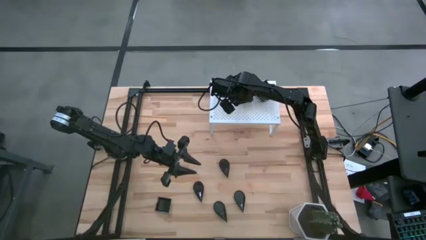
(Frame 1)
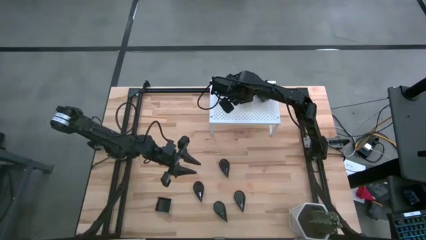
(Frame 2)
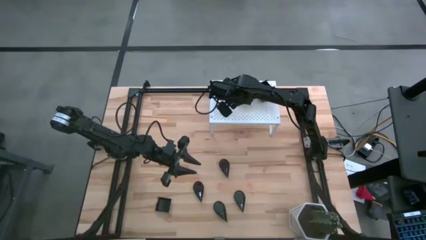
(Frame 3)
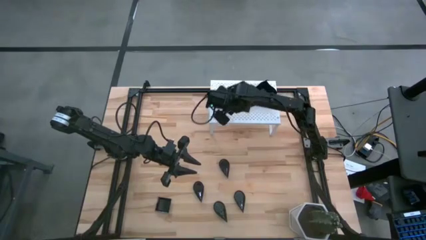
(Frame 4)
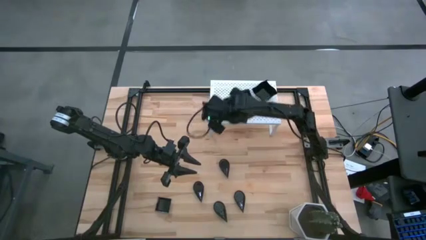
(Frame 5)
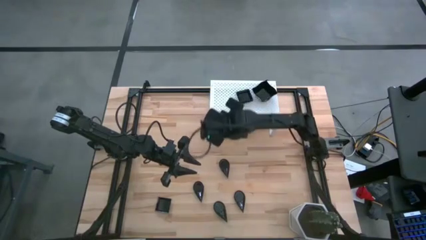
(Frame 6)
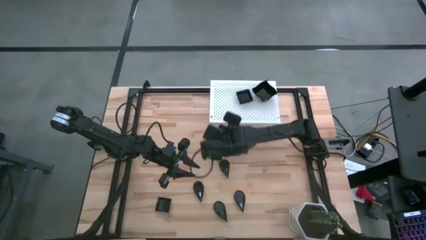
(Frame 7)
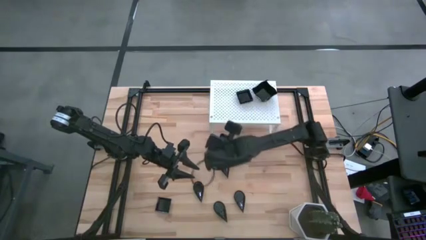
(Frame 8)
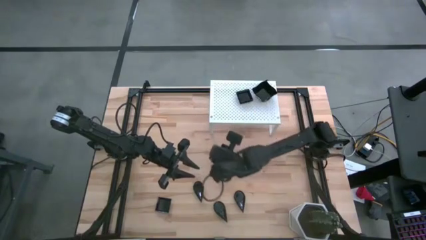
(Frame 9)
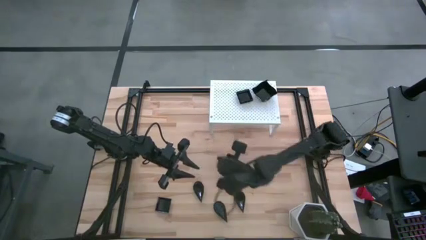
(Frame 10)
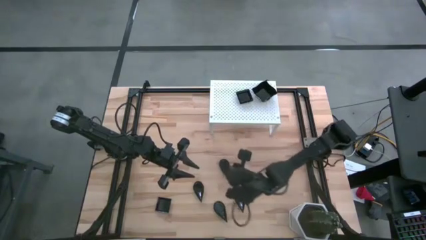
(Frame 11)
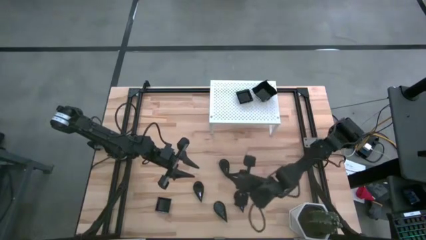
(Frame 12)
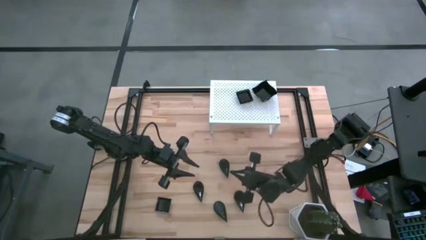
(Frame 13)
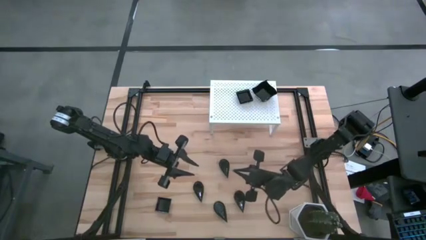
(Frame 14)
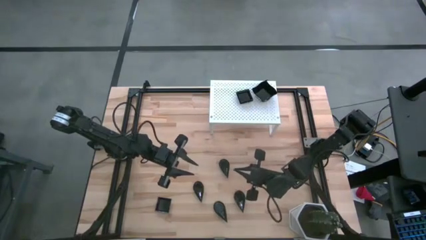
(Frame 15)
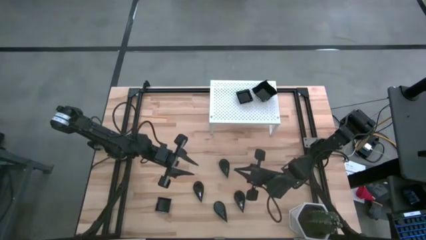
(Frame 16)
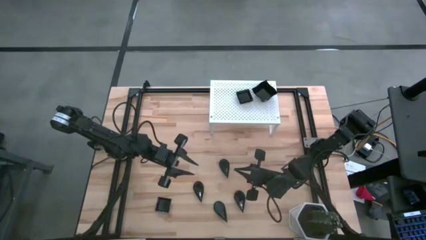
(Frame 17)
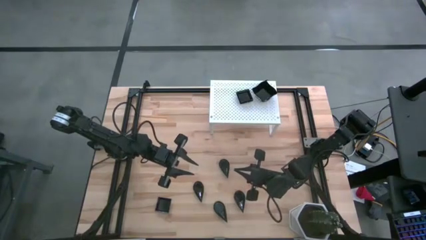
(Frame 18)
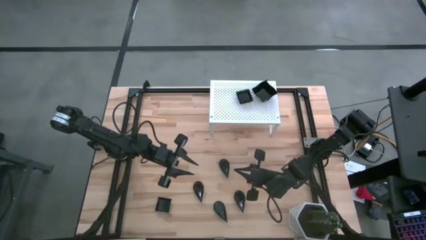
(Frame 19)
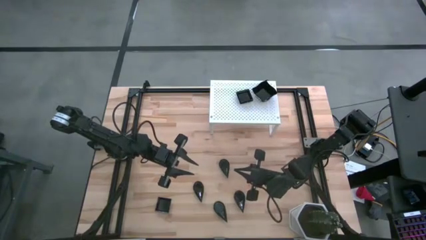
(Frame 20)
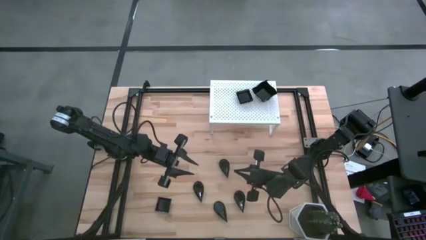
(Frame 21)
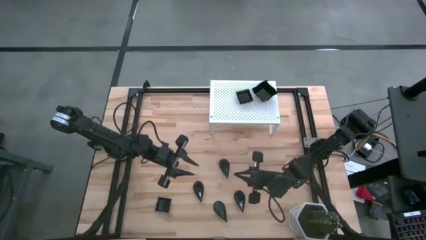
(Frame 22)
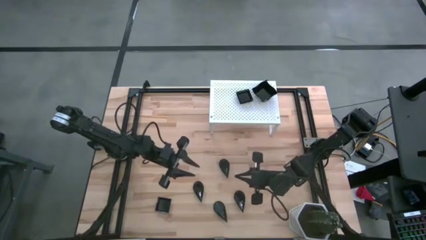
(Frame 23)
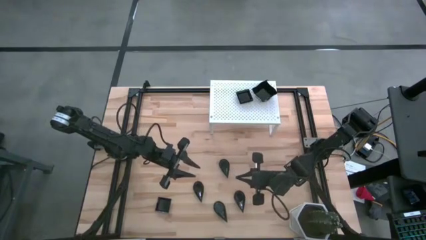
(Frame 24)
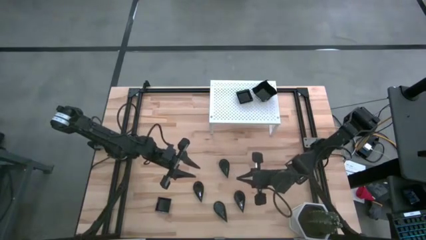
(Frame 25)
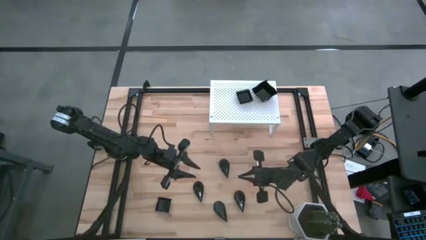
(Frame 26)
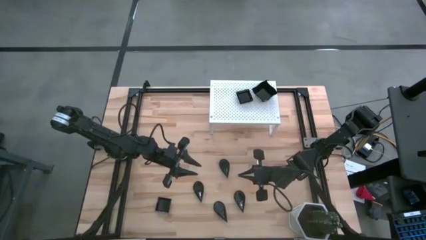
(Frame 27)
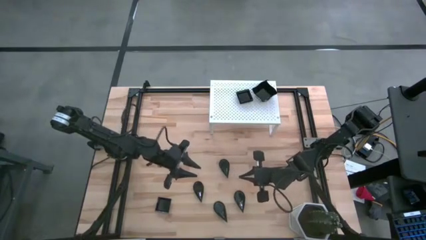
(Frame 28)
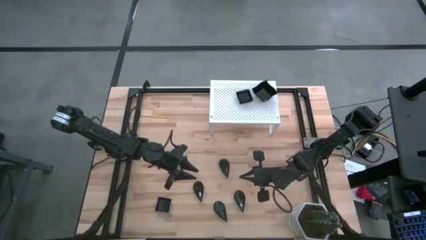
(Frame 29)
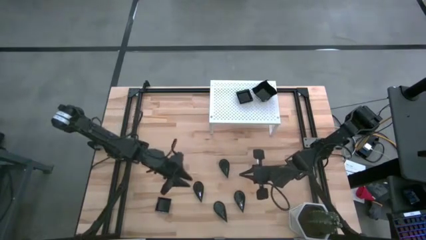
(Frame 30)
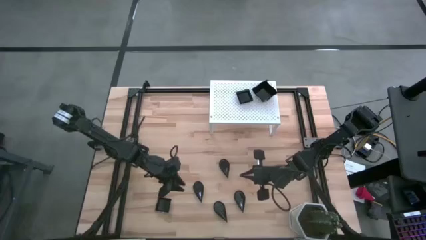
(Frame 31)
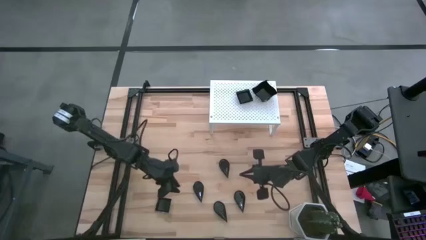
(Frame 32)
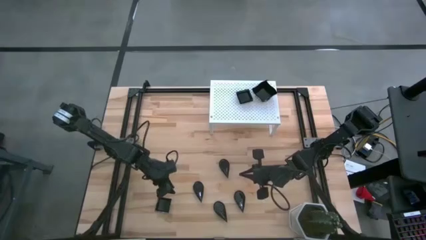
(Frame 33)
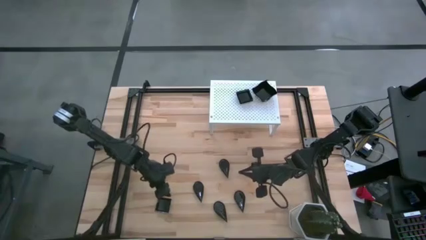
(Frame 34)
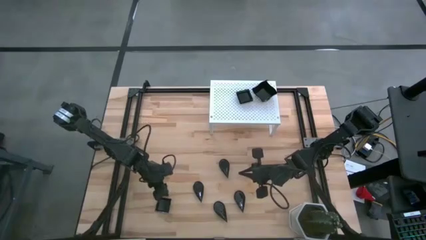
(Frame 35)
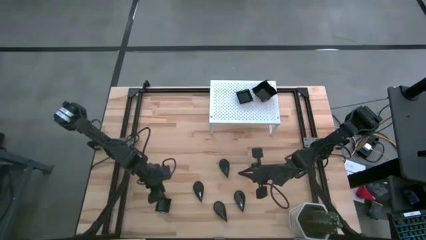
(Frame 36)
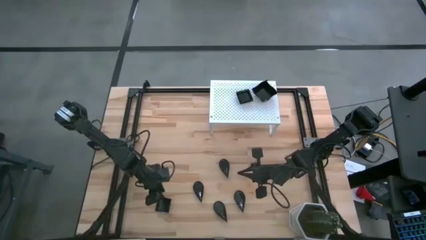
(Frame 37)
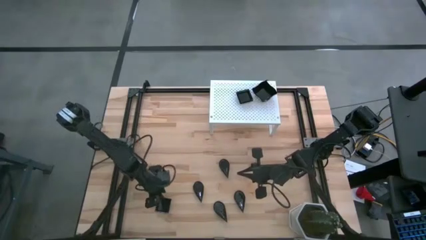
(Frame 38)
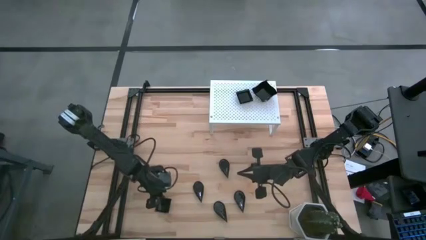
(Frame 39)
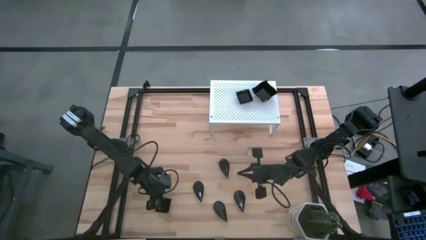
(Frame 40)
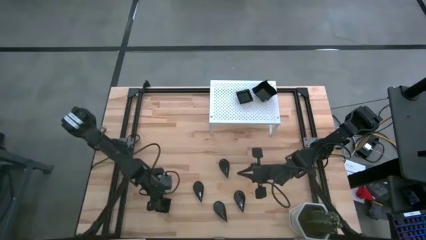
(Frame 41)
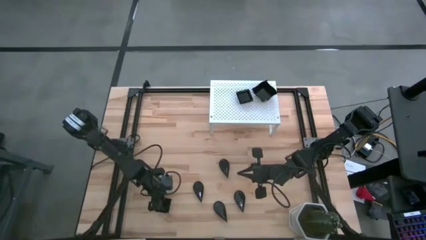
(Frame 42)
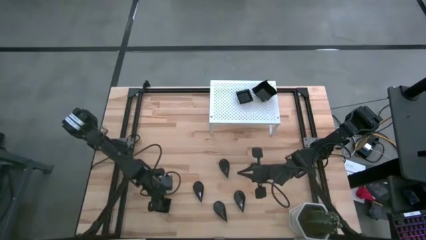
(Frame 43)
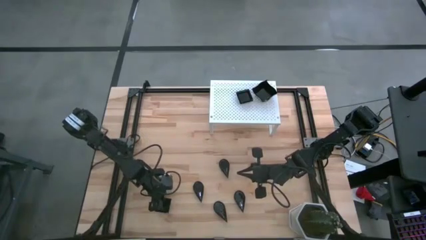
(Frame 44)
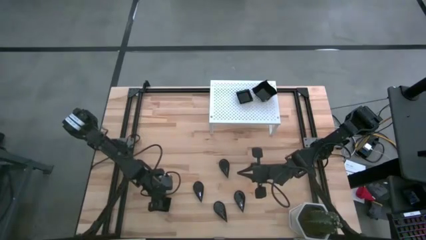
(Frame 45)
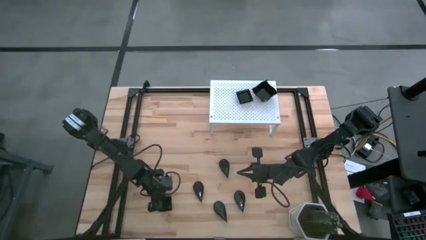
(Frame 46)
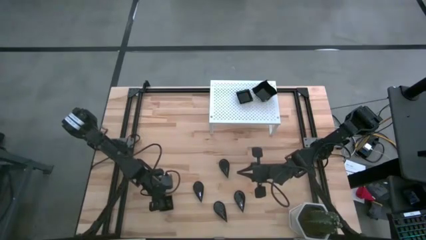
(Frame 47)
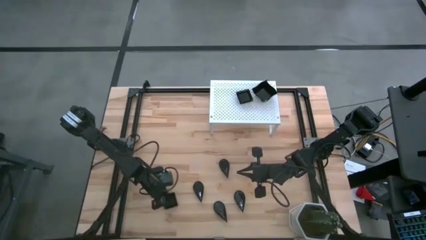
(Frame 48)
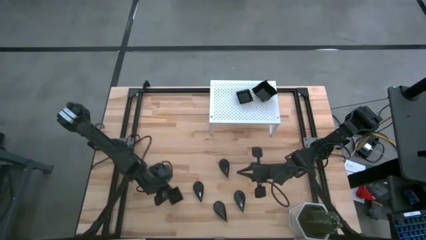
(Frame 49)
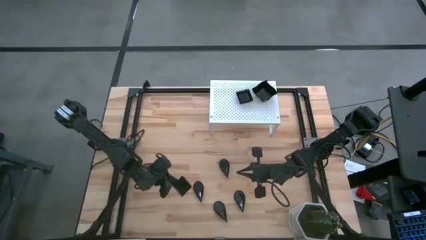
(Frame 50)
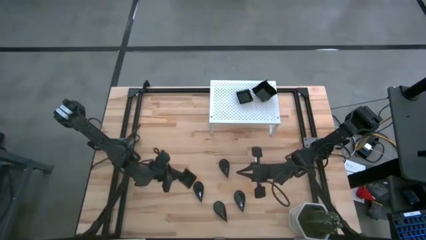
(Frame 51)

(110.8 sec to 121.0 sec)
Task: Pick & Place Mini shaped plates
Stack the square plate on top of the square plate on the shelf
